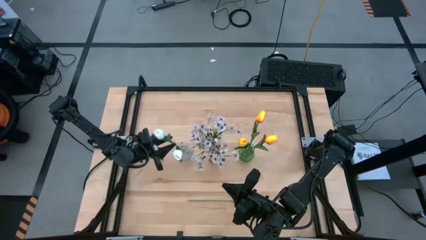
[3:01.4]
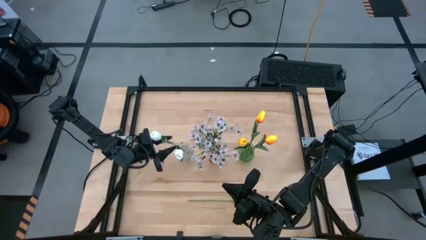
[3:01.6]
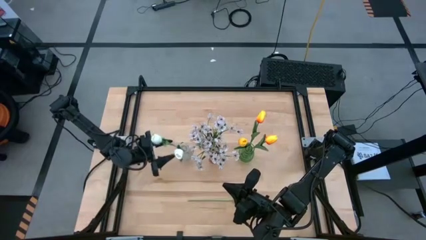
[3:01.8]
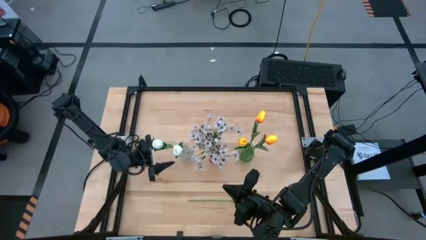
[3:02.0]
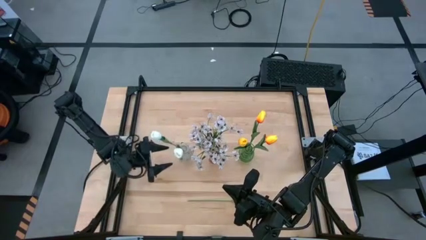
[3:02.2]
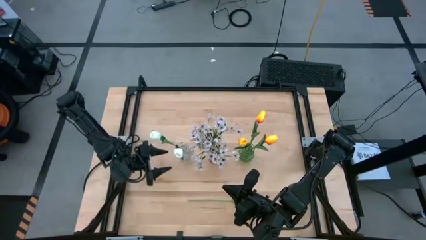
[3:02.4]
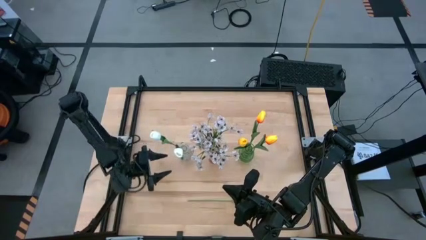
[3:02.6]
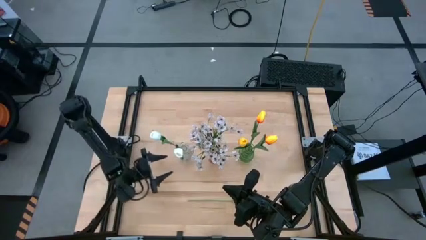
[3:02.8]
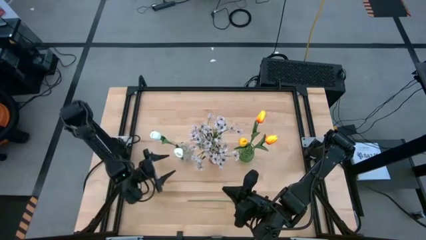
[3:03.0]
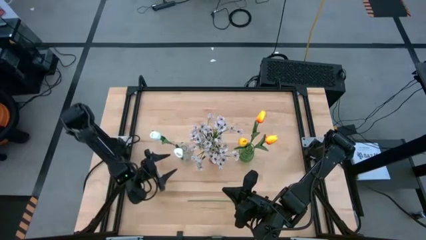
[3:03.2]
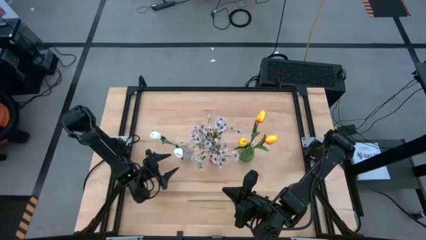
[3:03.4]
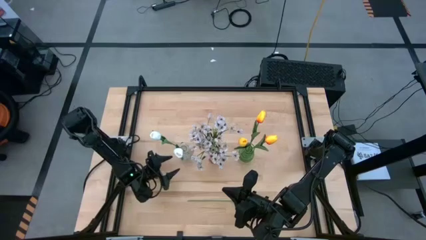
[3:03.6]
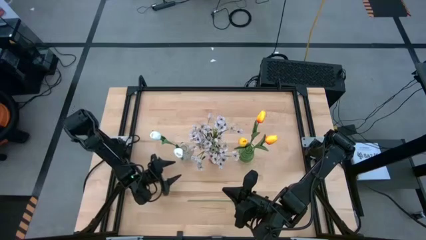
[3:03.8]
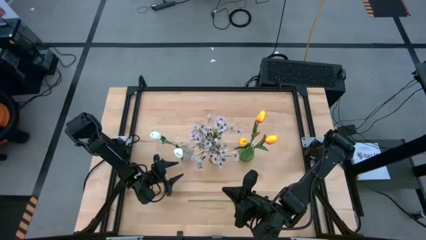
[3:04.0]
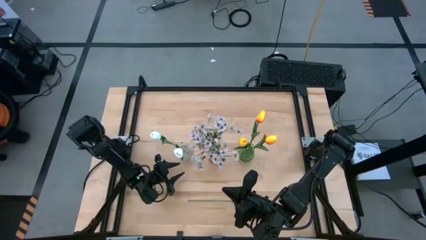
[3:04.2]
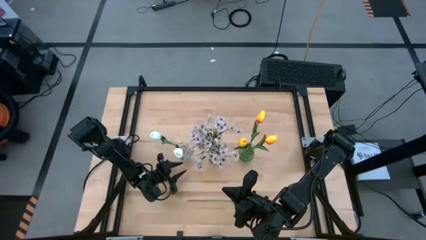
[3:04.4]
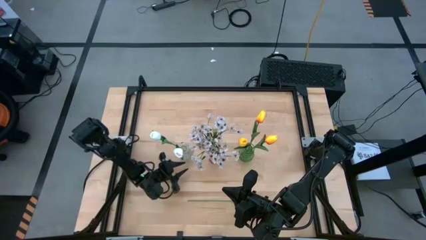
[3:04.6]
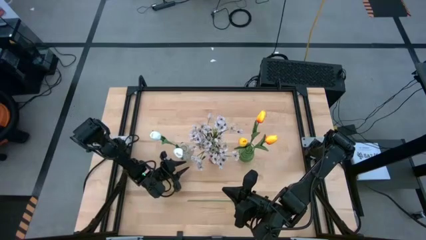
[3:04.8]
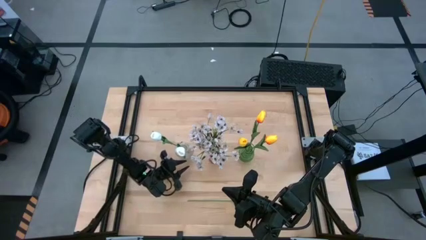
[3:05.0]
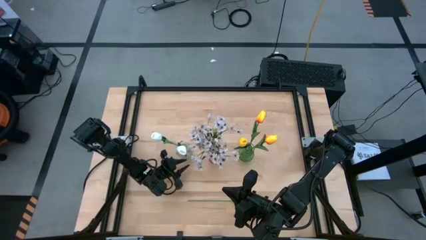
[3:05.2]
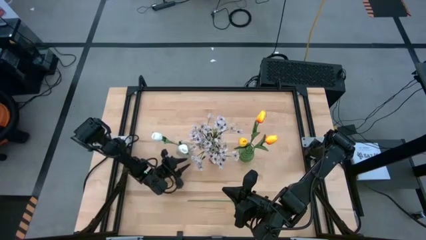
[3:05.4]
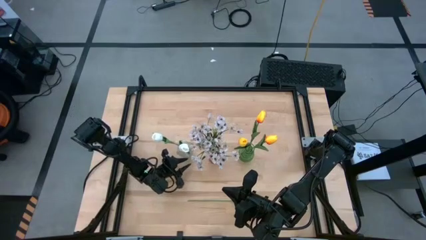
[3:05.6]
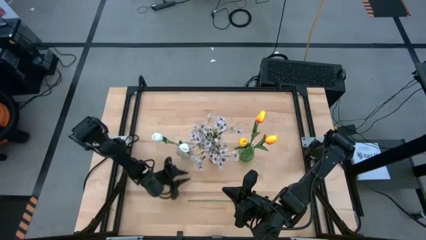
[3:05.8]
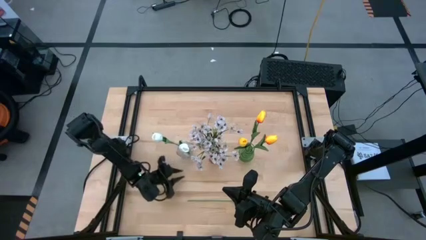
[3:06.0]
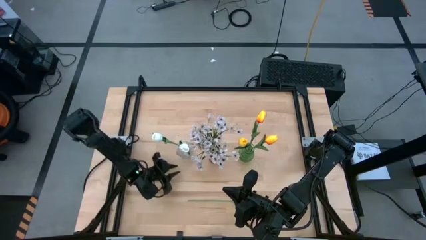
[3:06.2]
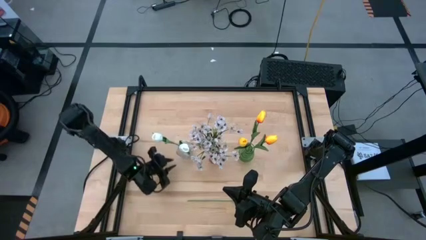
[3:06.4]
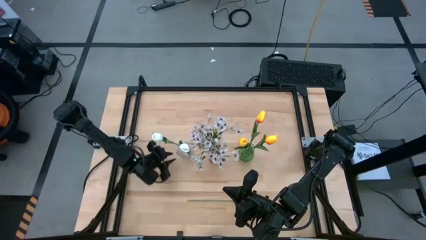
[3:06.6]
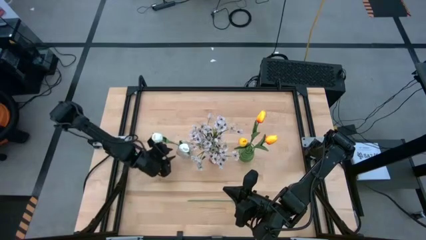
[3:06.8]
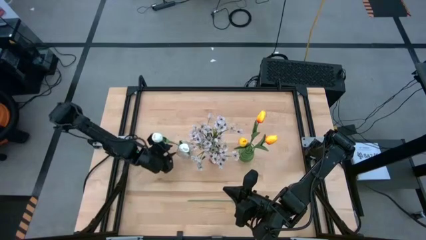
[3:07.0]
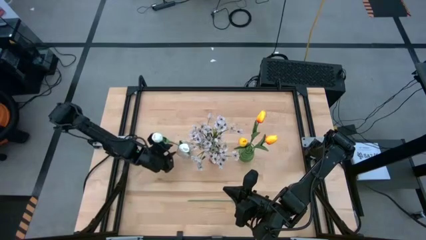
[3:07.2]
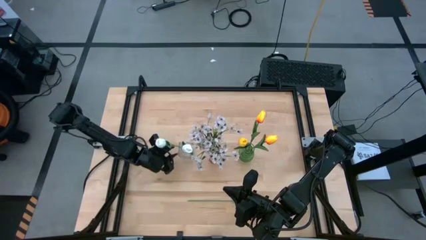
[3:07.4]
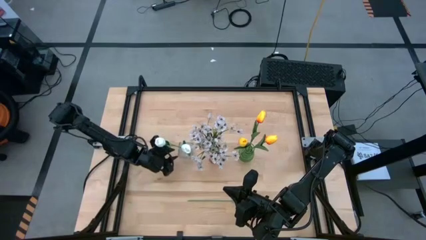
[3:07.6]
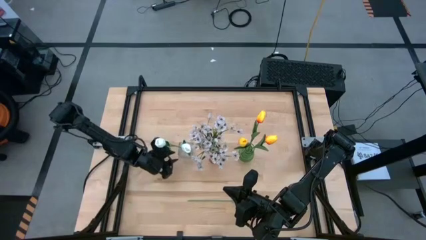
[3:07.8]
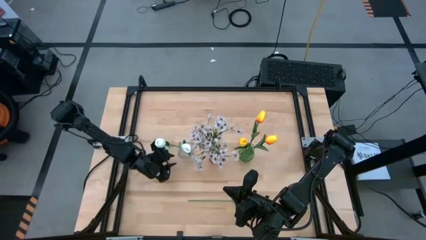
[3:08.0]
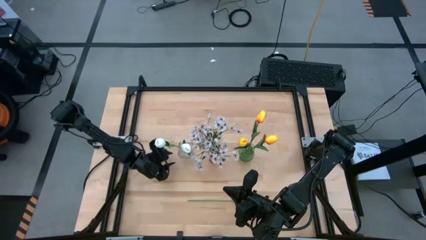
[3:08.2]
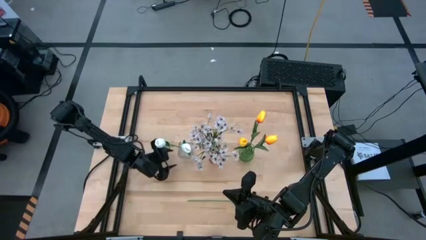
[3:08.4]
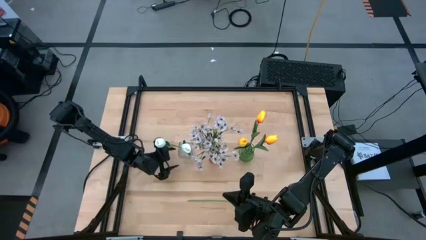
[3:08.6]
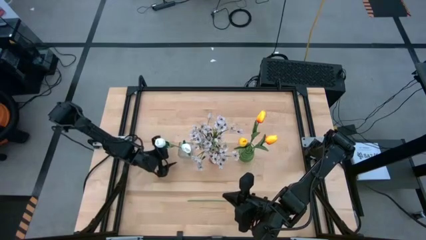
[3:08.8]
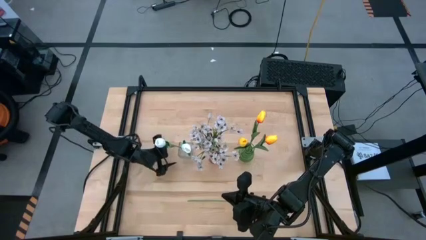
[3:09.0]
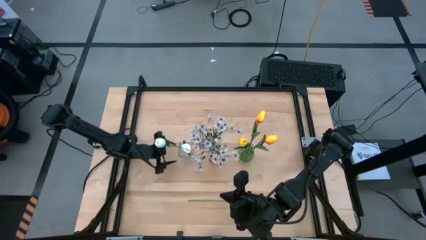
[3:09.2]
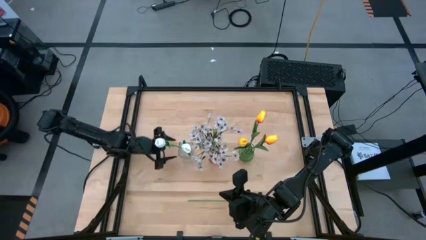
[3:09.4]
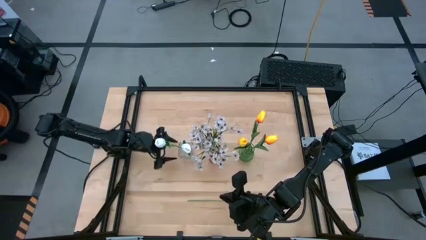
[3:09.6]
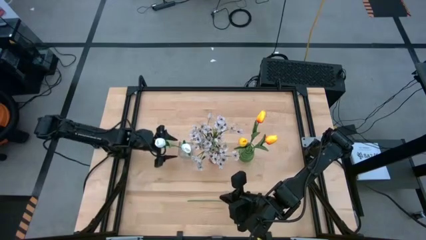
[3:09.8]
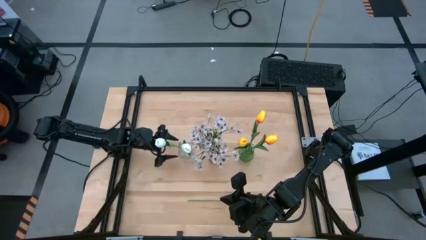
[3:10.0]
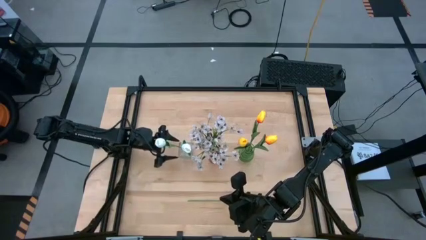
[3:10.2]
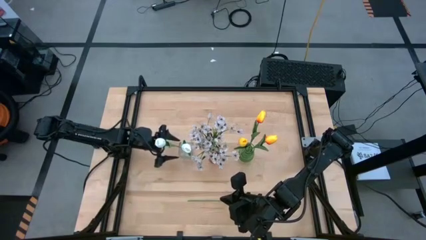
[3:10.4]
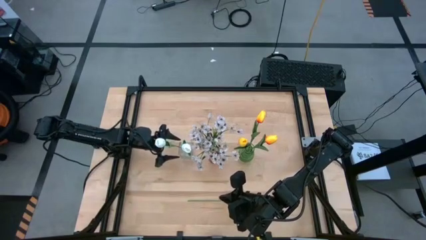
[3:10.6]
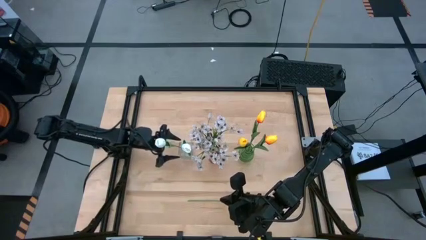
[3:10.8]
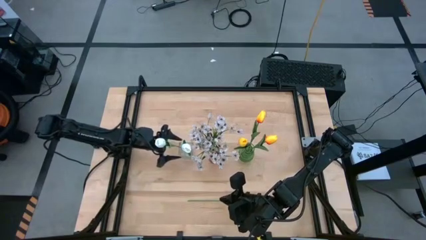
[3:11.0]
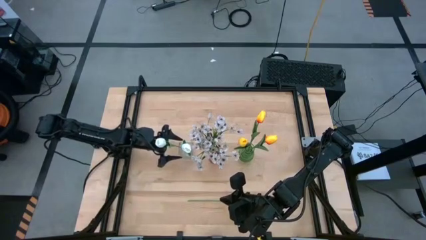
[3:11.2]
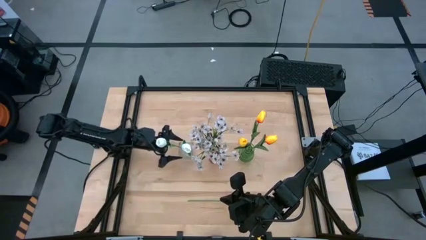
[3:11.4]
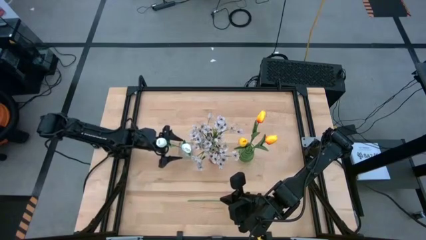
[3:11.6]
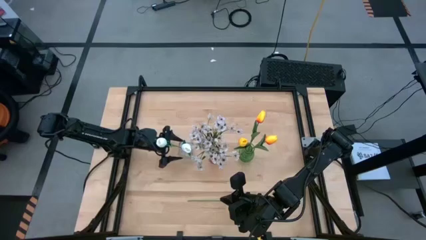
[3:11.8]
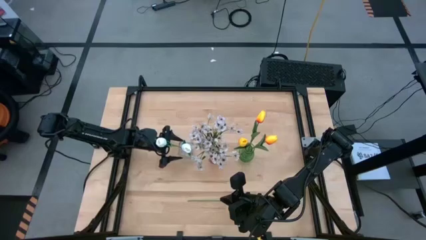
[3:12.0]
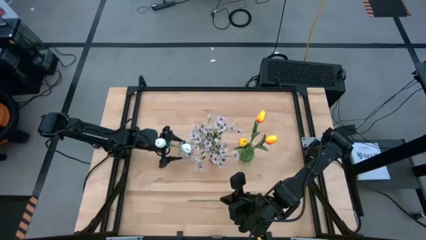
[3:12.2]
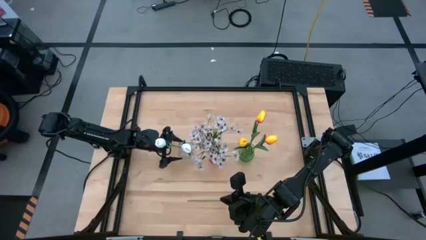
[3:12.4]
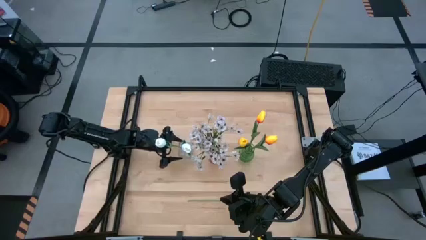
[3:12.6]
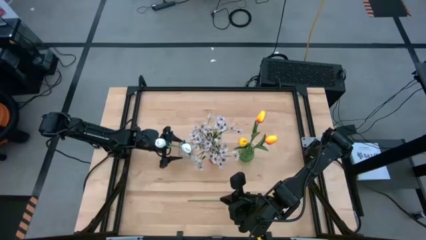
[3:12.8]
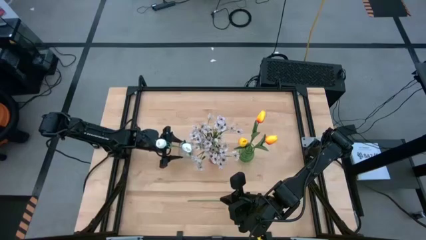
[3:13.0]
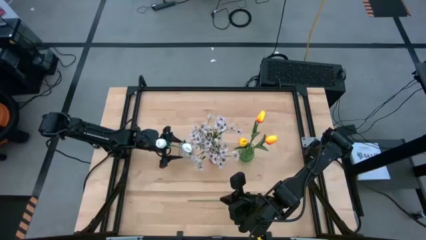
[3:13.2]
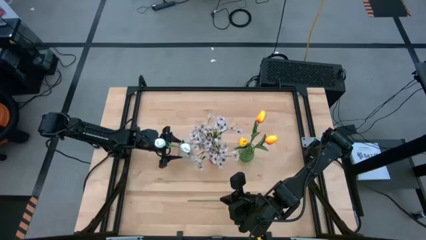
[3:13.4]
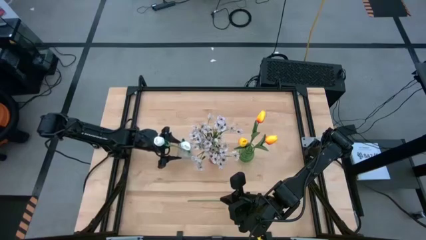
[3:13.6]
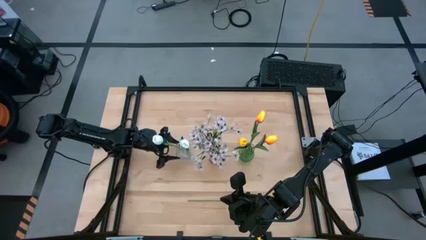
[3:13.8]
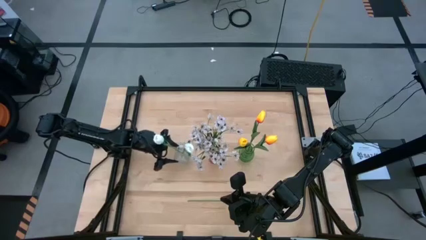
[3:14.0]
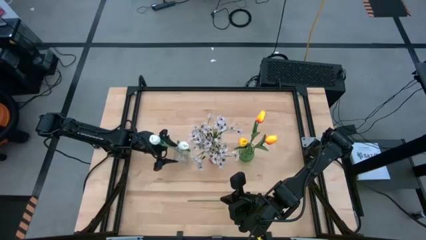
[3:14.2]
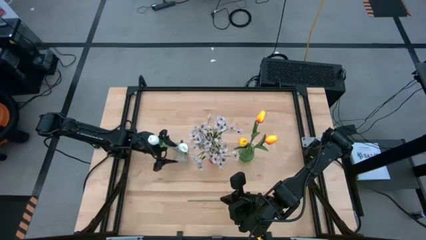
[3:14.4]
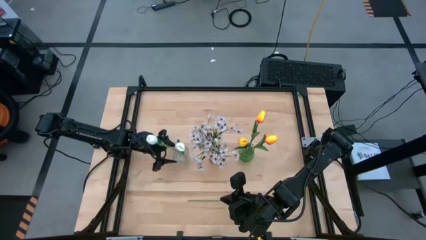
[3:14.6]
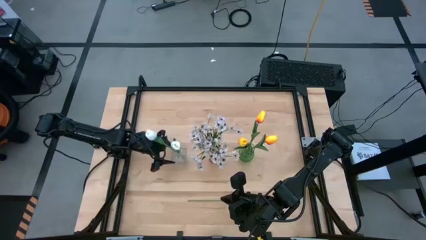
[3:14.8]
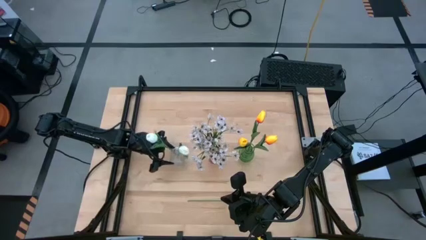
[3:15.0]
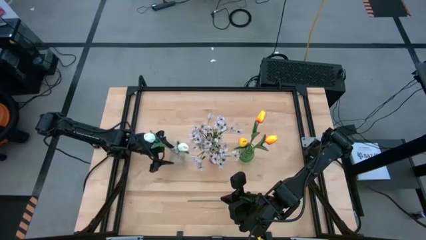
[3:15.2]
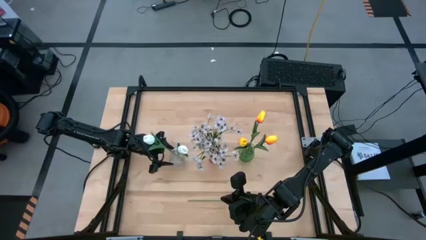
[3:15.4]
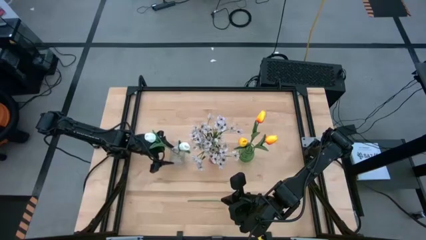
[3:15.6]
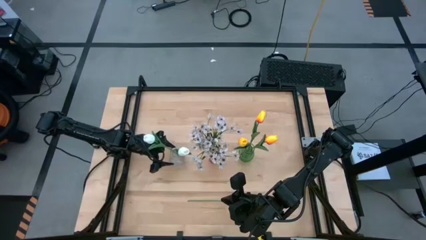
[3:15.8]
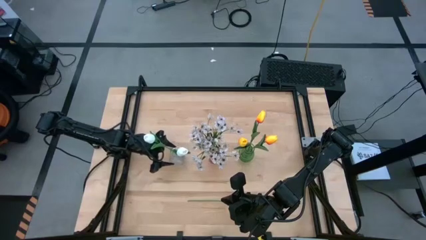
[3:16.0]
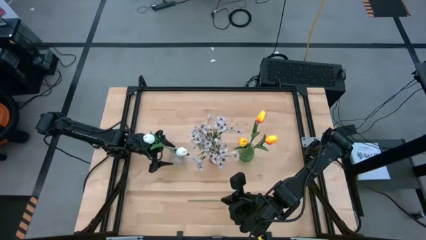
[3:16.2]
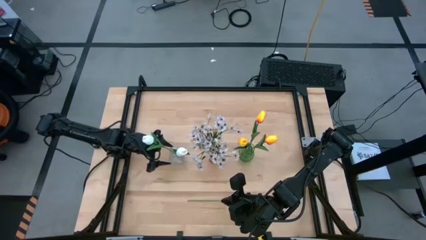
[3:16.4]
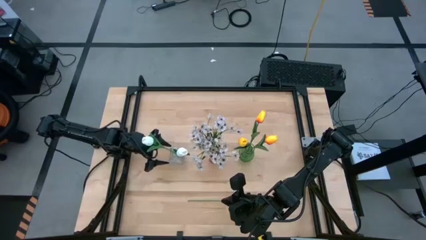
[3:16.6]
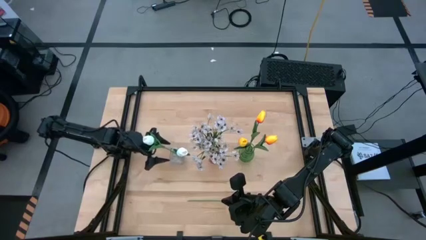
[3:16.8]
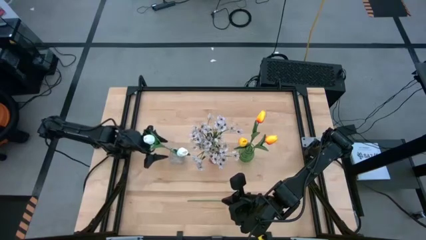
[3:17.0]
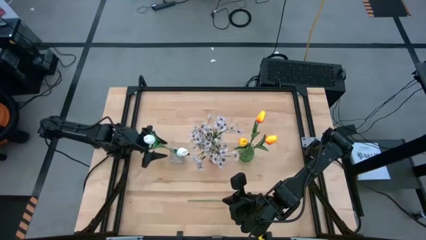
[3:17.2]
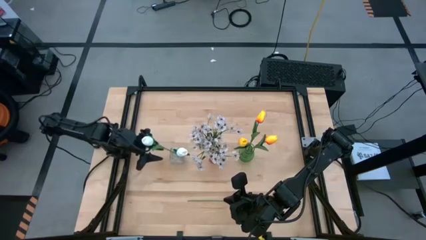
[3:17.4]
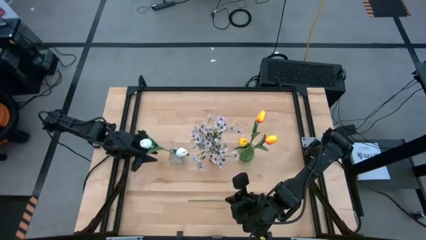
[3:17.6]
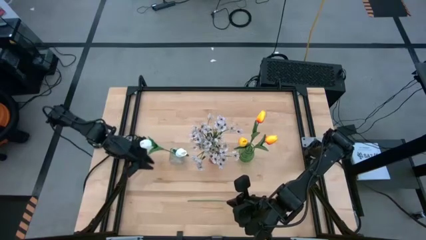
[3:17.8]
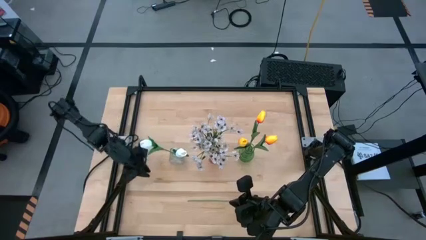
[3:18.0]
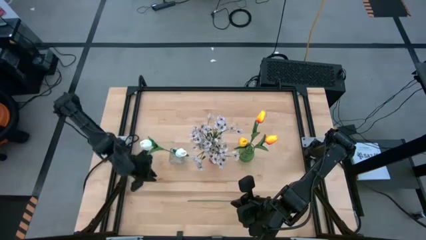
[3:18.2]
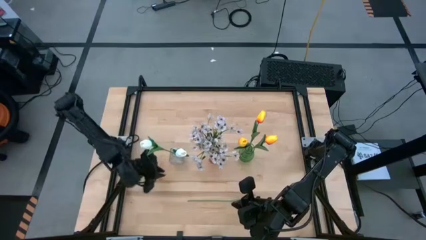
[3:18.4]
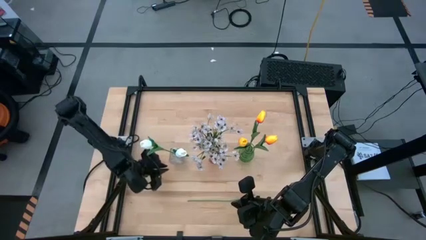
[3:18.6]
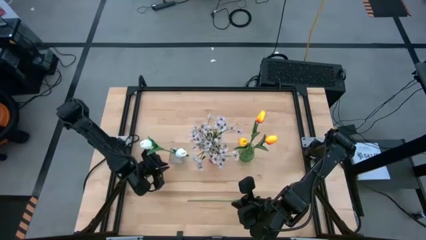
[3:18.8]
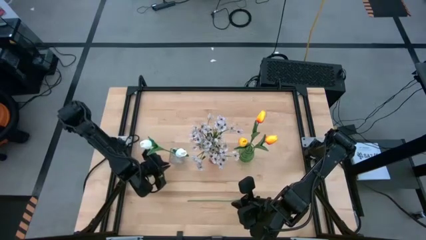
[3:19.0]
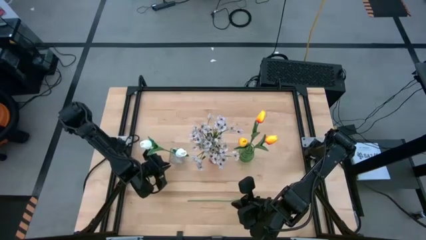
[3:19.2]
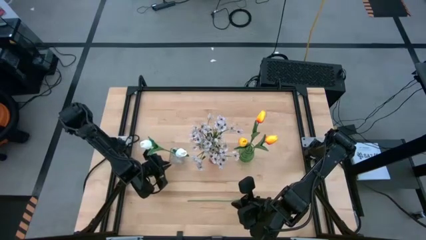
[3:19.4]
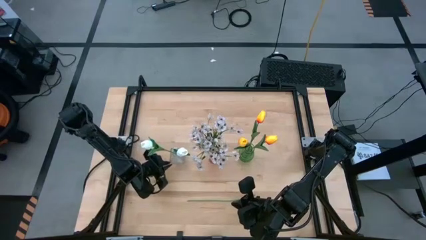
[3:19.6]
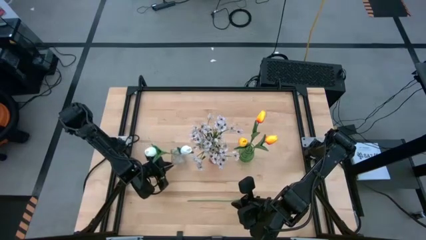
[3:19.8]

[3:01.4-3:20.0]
Task: Sort flowers into vase by color
Adjust the transparent vase
